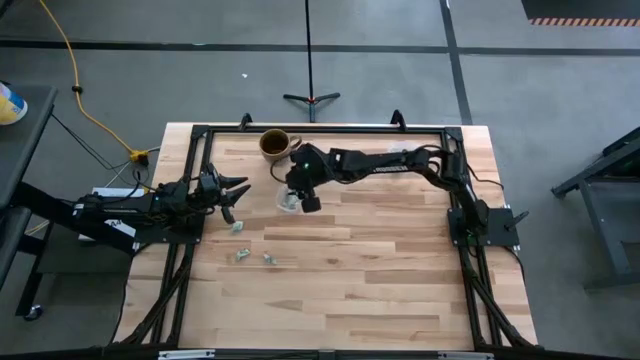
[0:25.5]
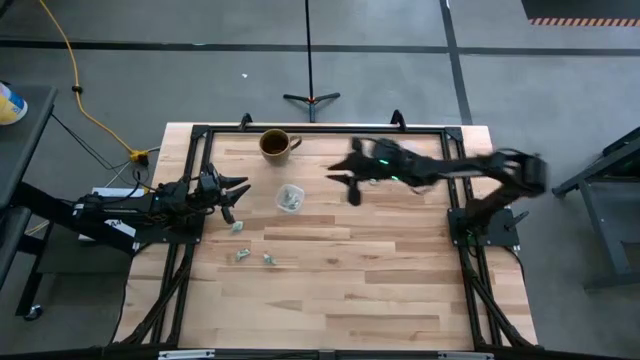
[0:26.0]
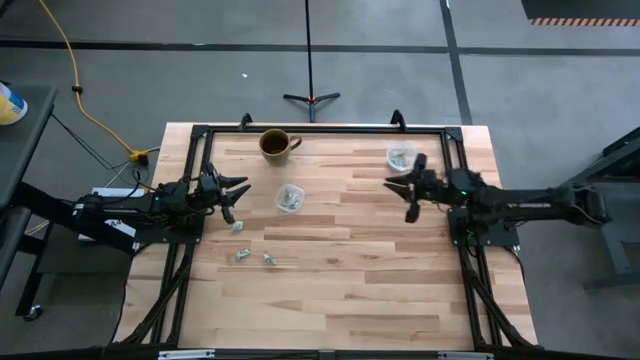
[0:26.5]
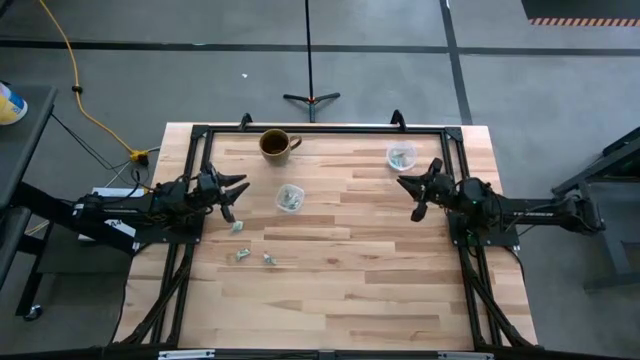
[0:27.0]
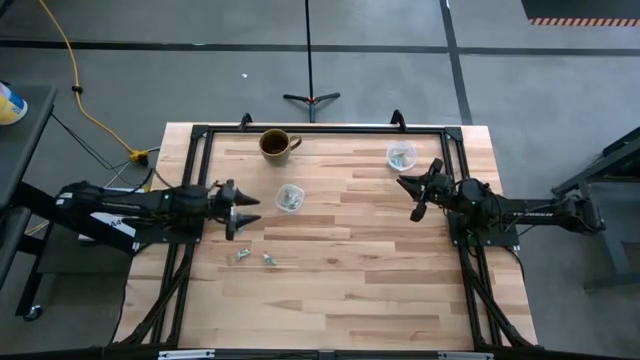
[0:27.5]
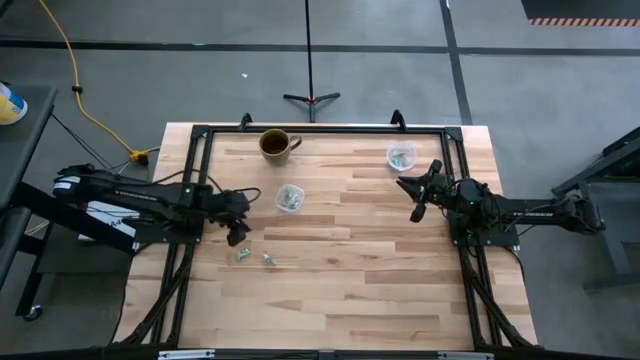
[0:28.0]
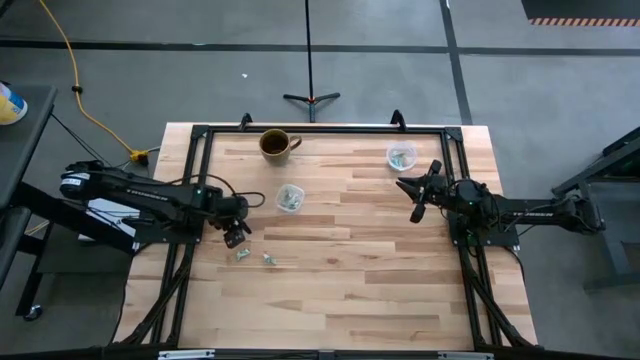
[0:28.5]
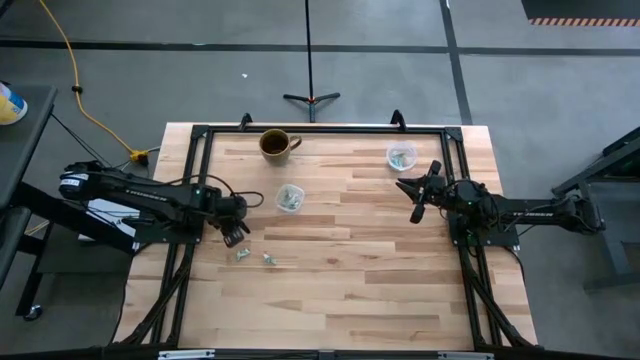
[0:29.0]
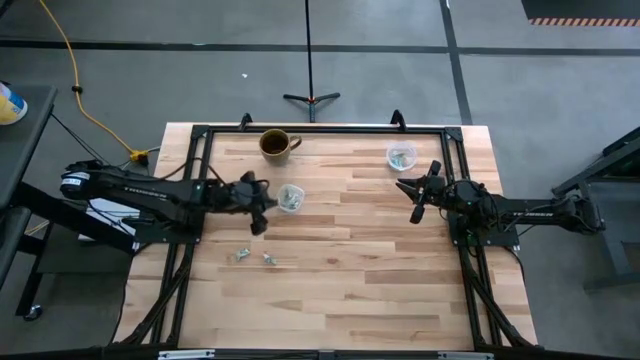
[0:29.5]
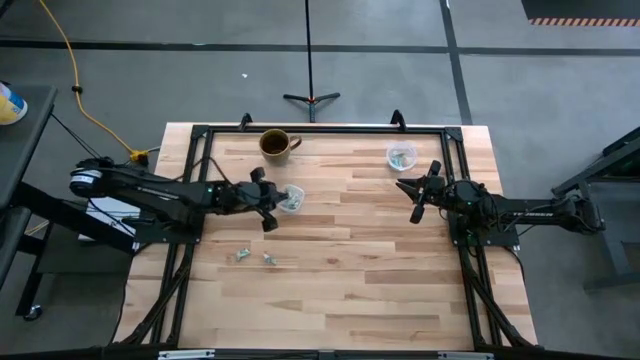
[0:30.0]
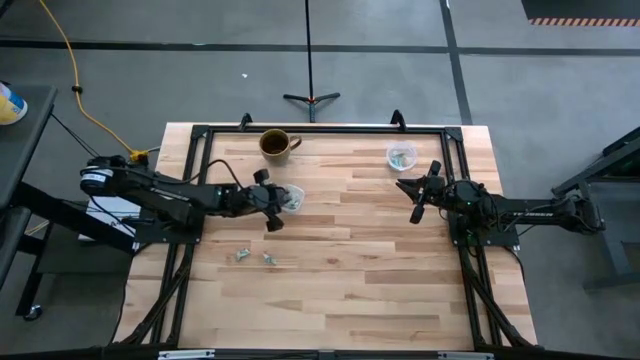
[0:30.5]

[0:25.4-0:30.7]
Task: Pick and place Stevia / Truvia into bins
Put the white stevia packet into the left transparent container

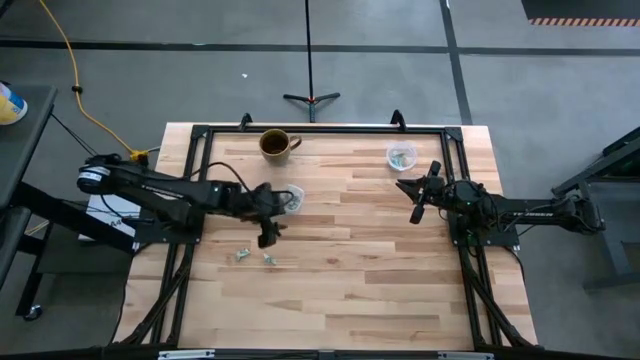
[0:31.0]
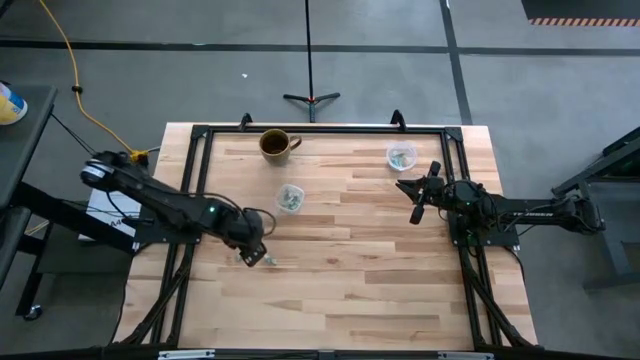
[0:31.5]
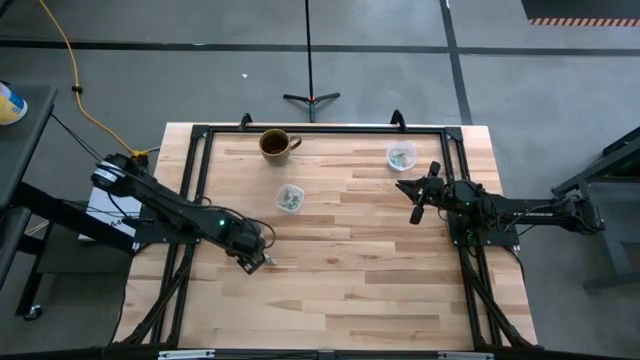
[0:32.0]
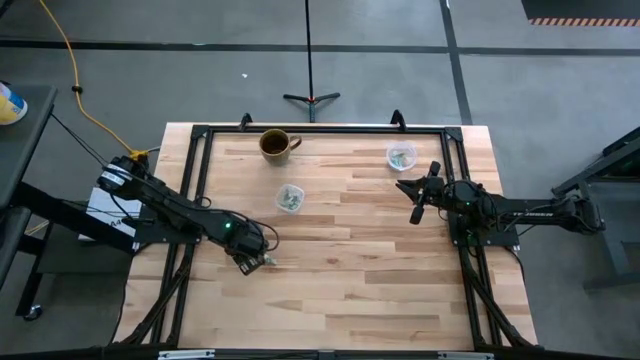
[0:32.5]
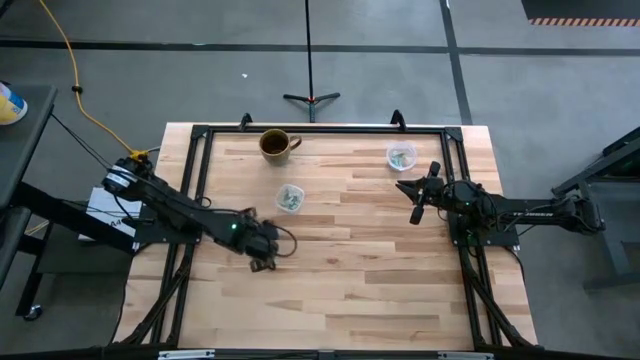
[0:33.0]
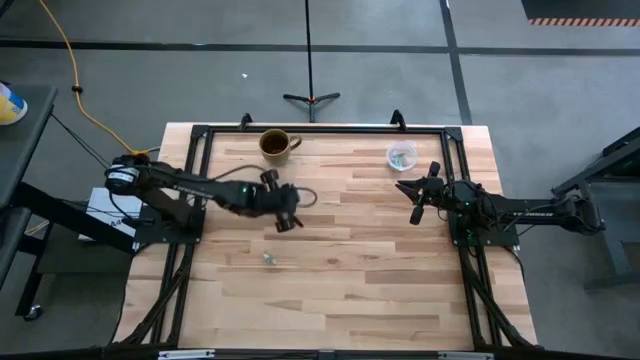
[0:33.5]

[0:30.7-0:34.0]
Put the white stevia packet into the left transparent container

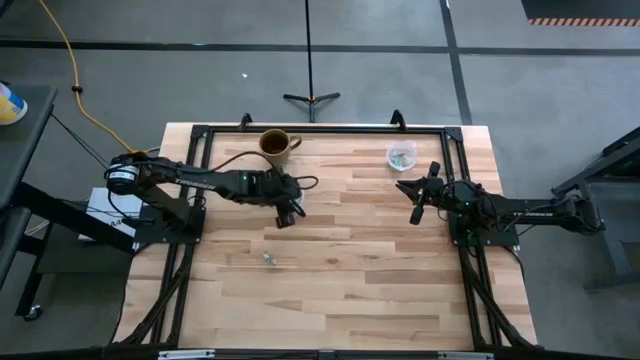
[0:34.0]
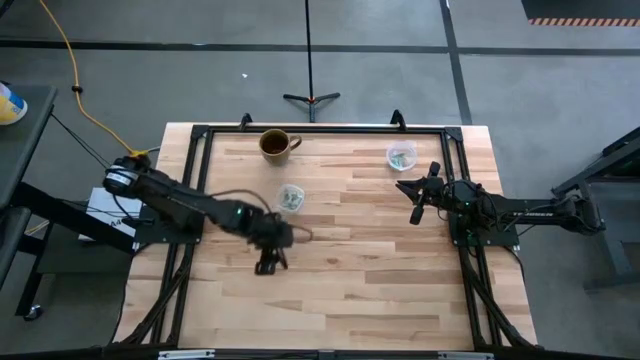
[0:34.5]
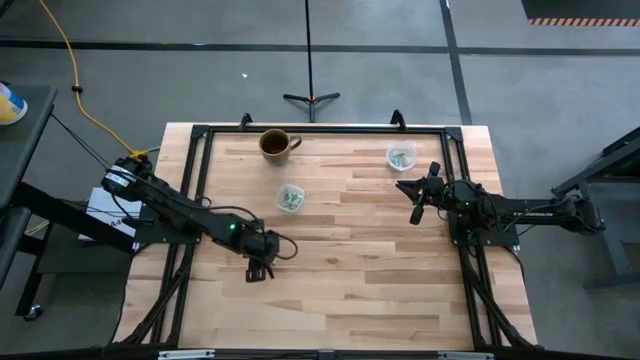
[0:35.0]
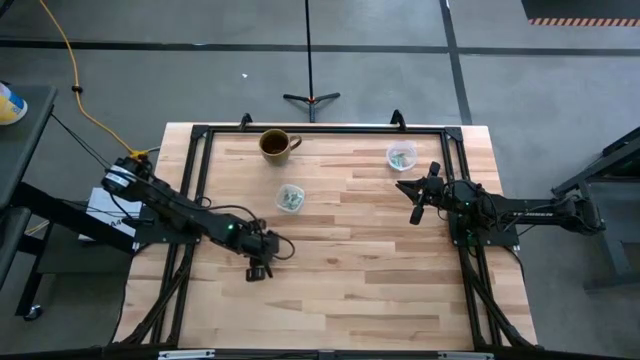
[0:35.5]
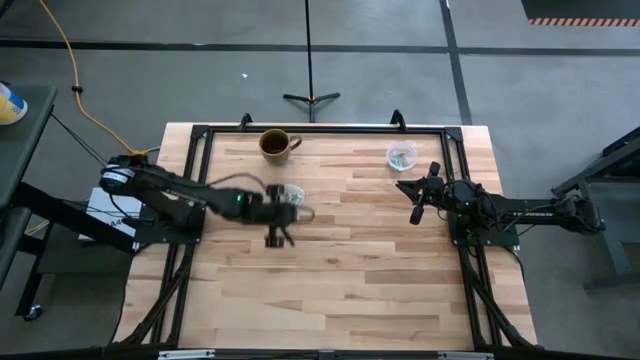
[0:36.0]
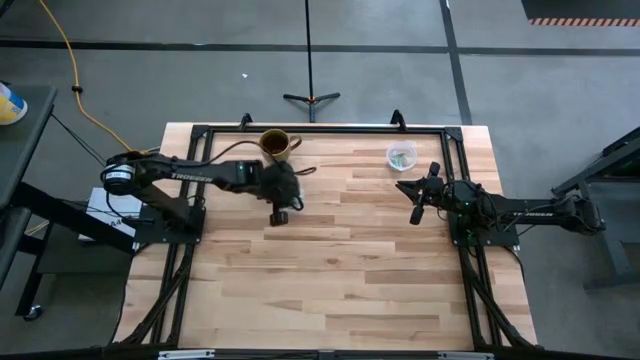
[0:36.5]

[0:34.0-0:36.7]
Put the white stevia packet into the left transparent container

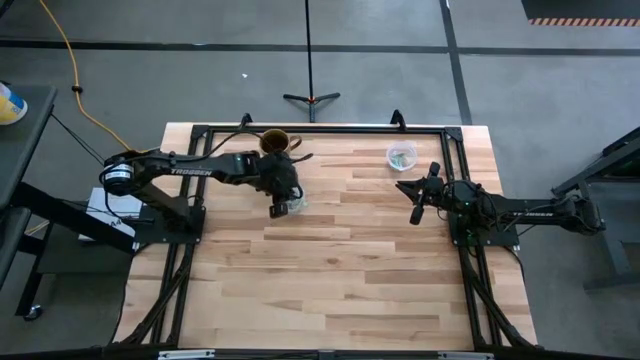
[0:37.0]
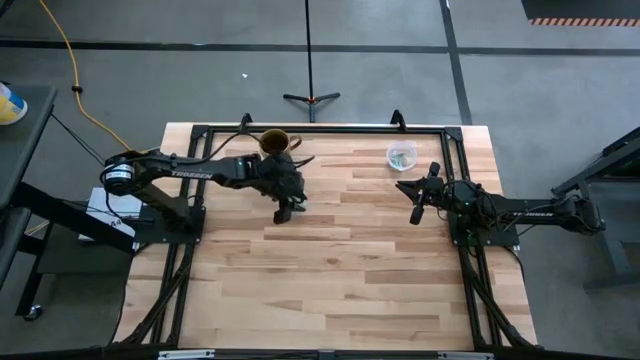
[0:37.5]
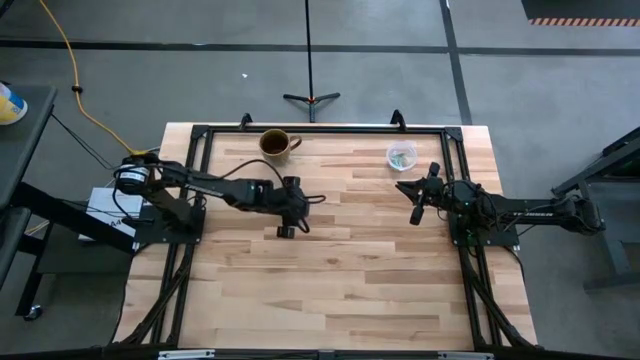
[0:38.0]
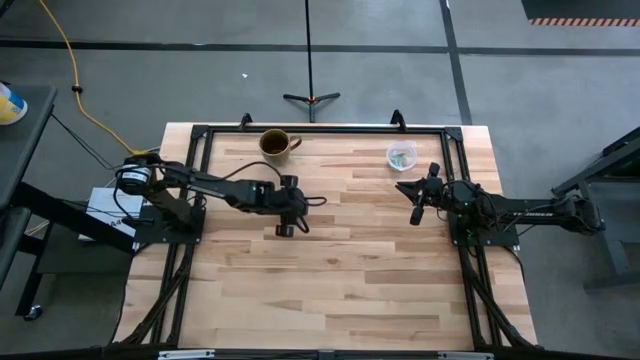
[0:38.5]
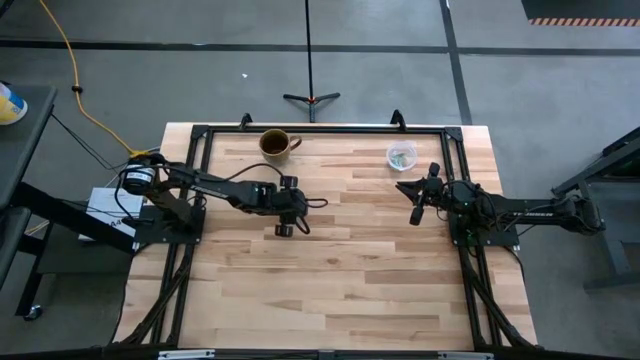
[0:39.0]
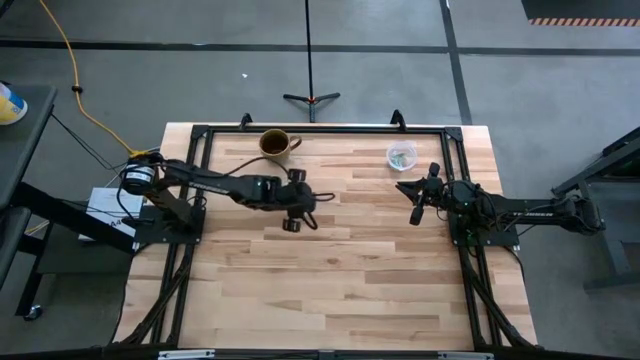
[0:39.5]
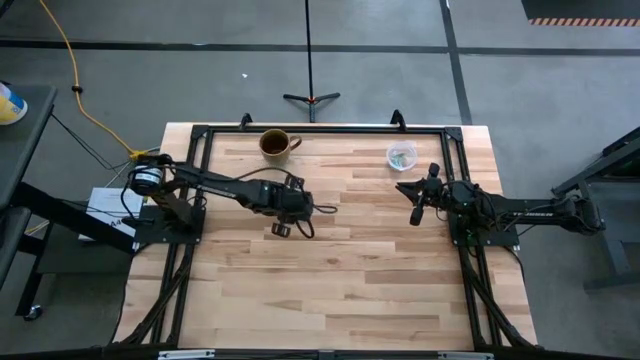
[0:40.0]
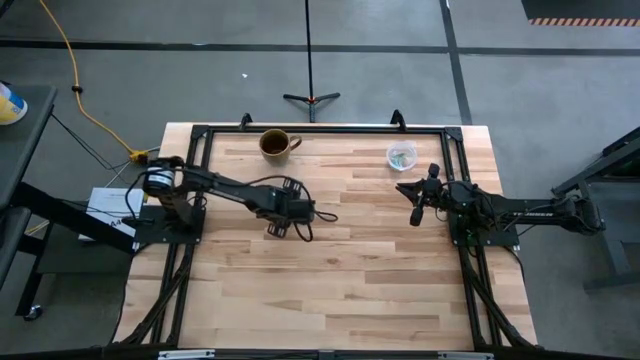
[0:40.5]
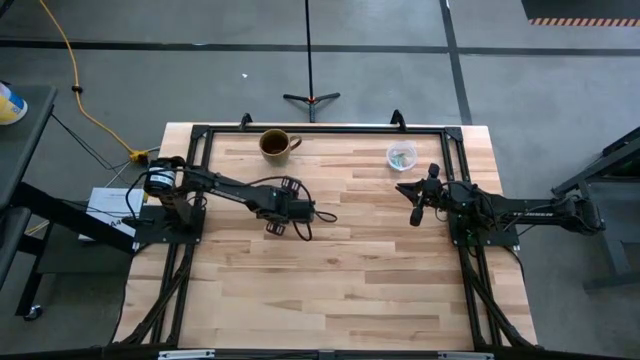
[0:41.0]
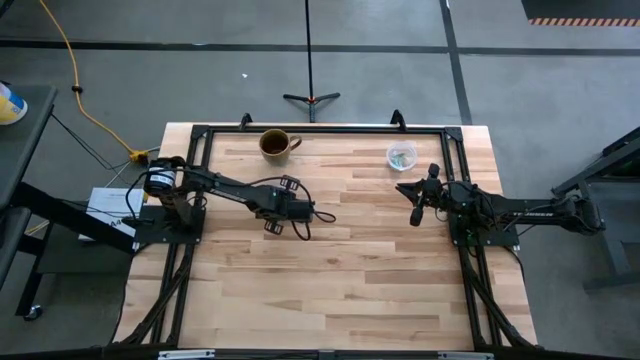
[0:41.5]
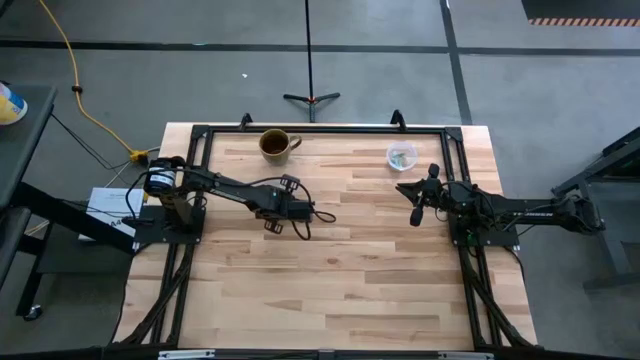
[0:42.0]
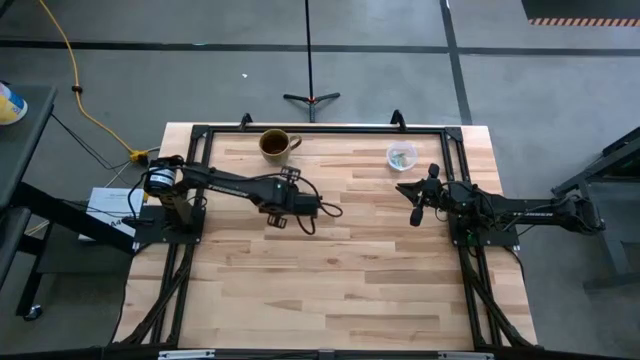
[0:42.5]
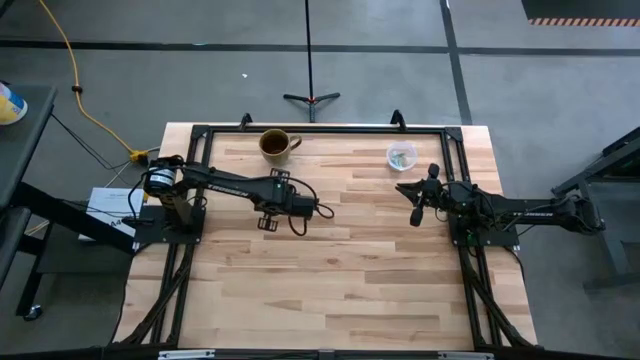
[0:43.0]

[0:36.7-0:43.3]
Put the white stevia packet into the left transparent container

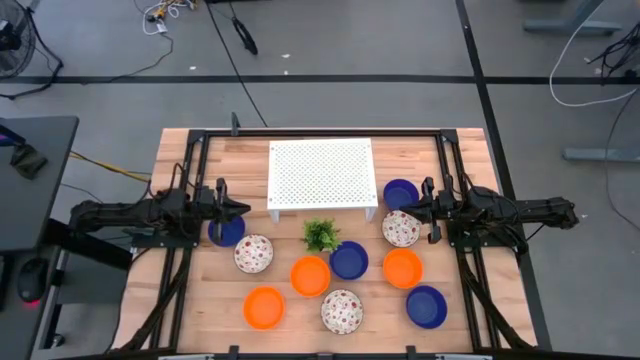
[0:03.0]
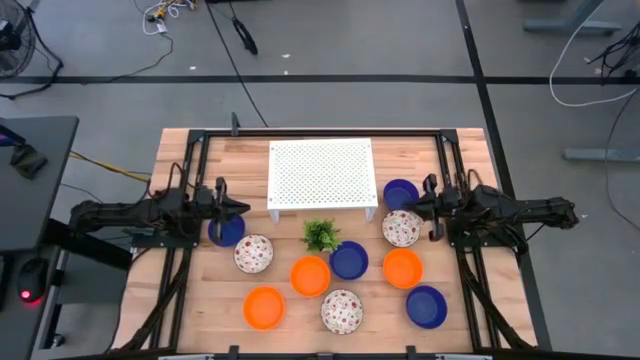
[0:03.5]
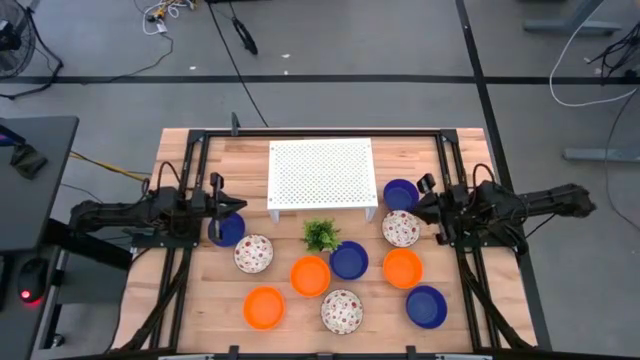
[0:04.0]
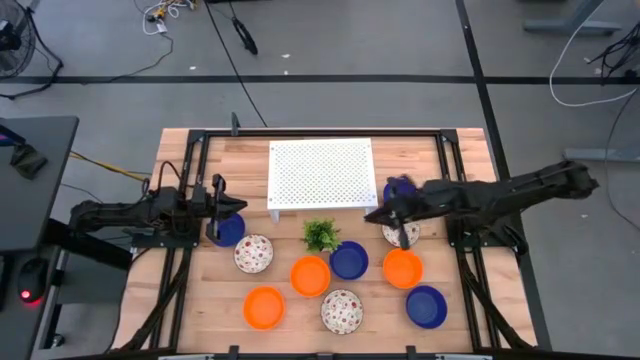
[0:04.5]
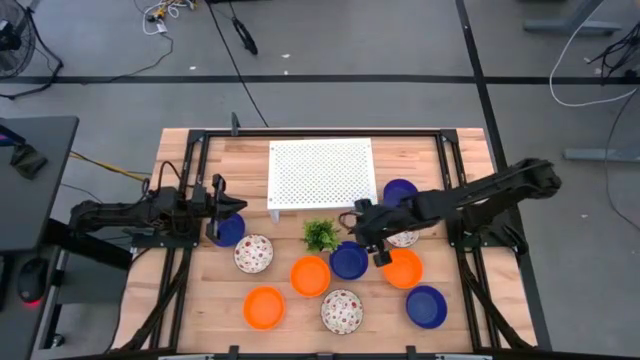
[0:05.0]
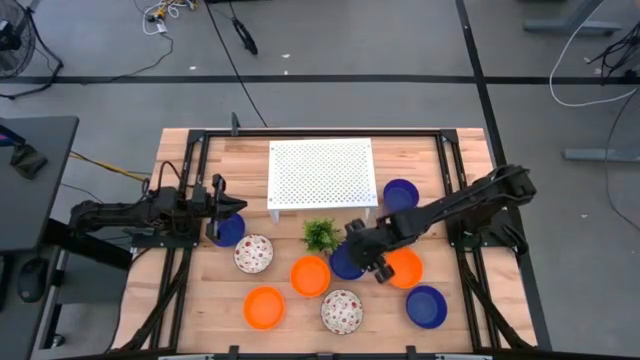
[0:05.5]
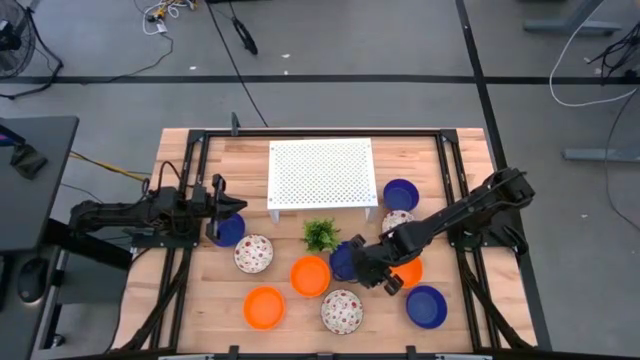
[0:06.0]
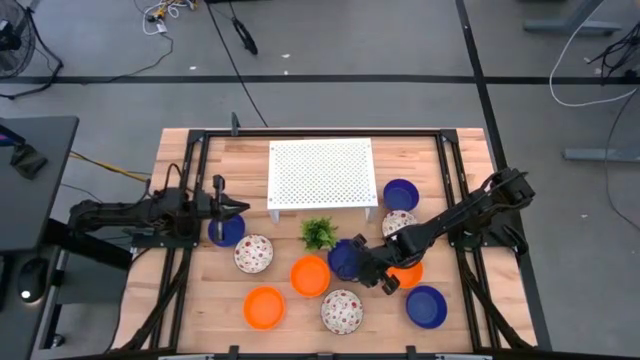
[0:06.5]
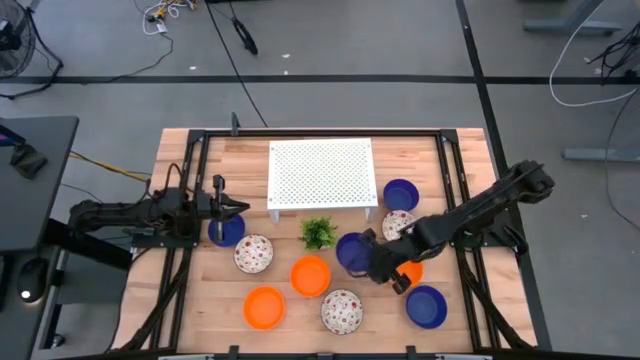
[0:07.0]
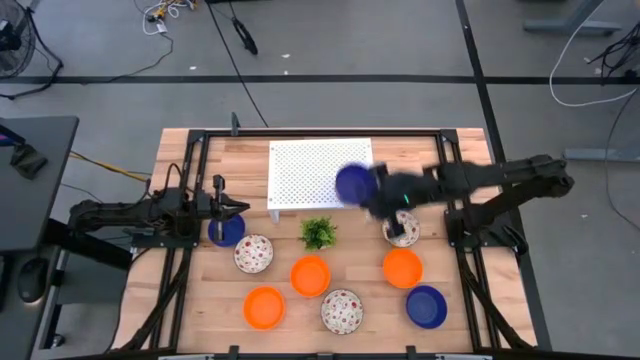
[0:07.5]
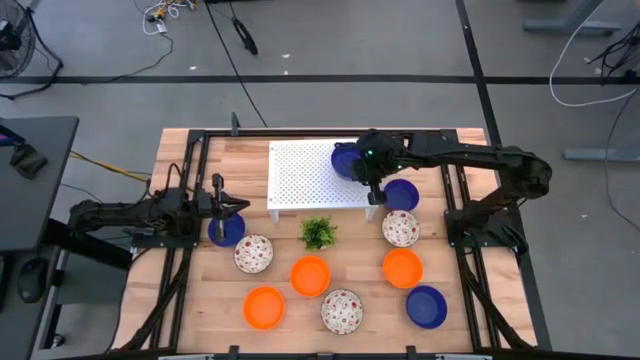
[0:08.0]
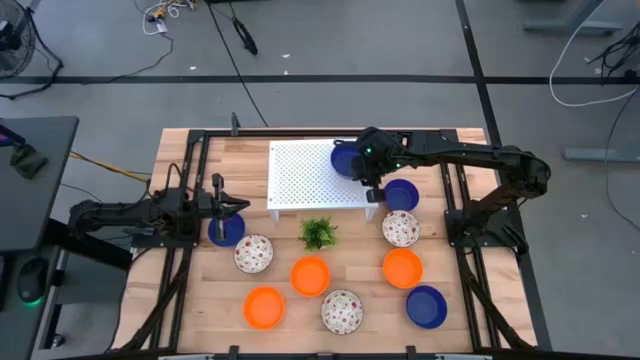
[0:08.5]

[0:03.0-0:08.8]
Task: Pick & Place Mini bowls
Put the blue bowl on the shelf
